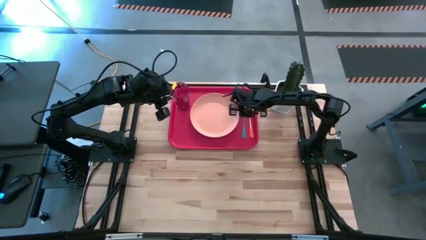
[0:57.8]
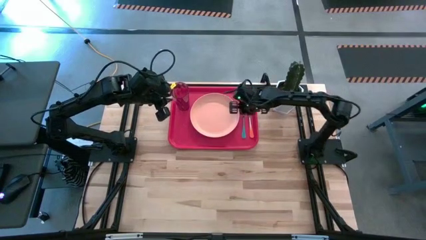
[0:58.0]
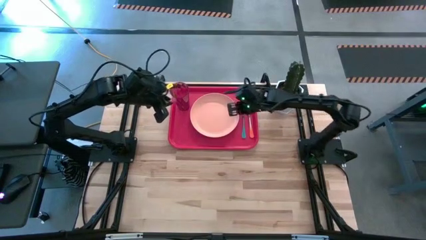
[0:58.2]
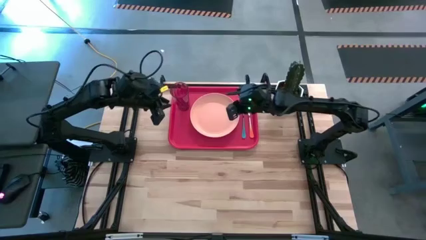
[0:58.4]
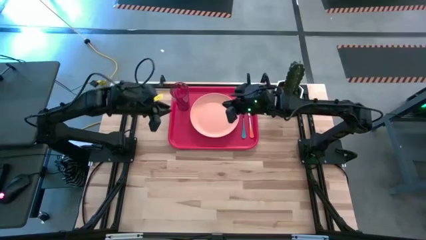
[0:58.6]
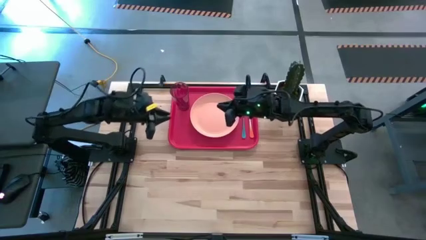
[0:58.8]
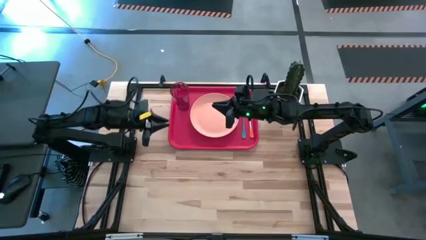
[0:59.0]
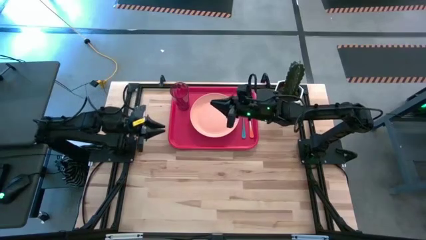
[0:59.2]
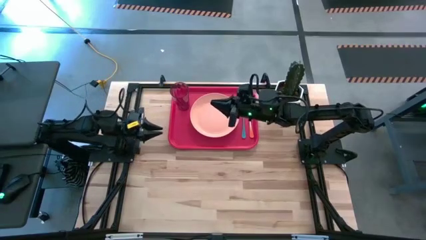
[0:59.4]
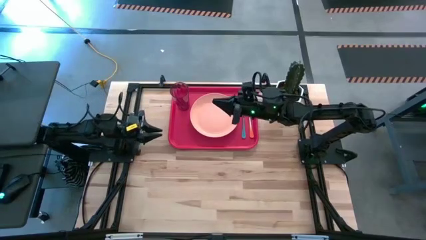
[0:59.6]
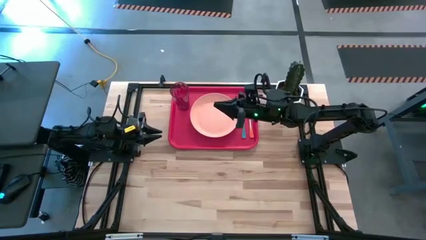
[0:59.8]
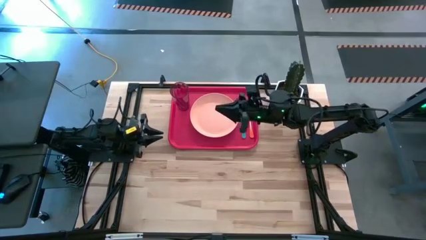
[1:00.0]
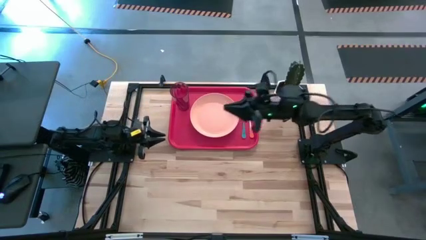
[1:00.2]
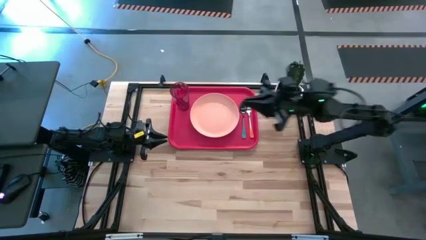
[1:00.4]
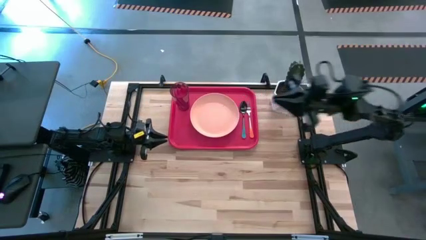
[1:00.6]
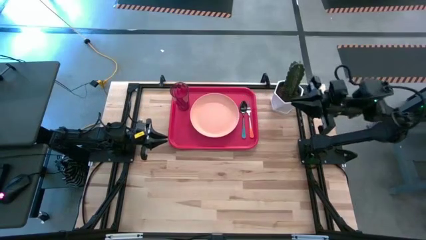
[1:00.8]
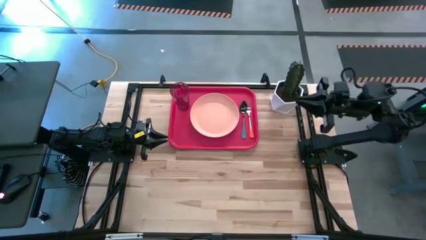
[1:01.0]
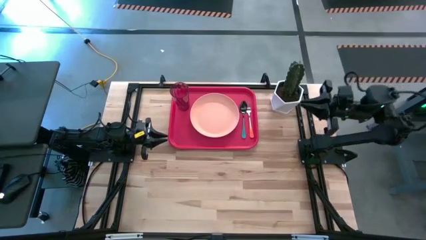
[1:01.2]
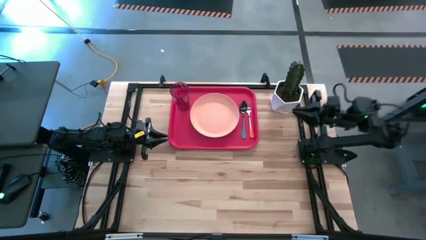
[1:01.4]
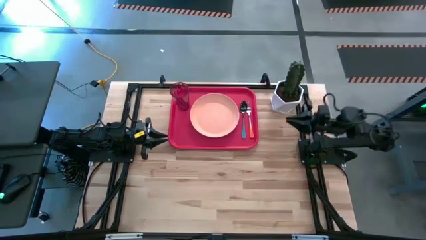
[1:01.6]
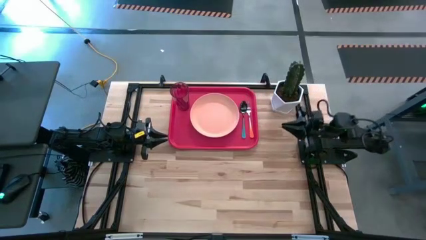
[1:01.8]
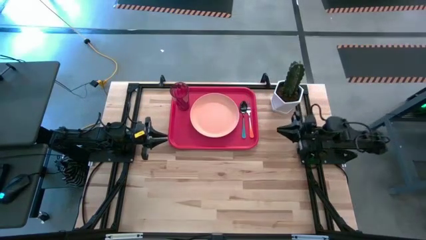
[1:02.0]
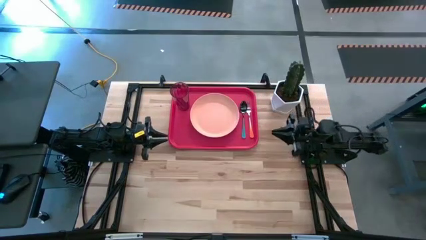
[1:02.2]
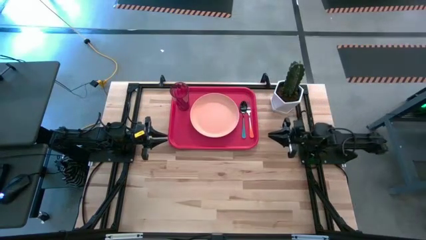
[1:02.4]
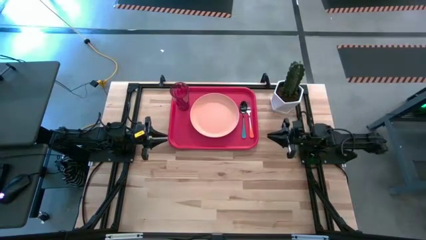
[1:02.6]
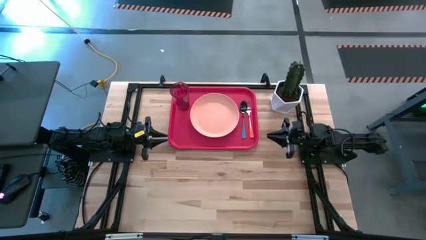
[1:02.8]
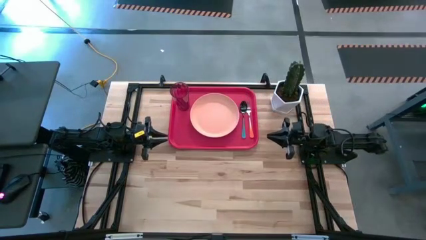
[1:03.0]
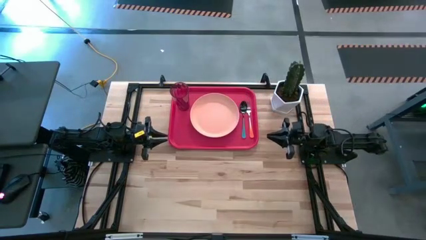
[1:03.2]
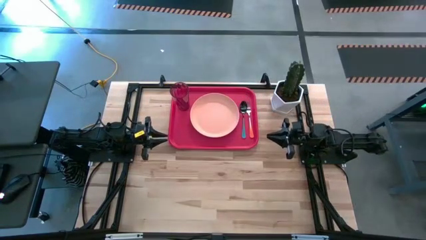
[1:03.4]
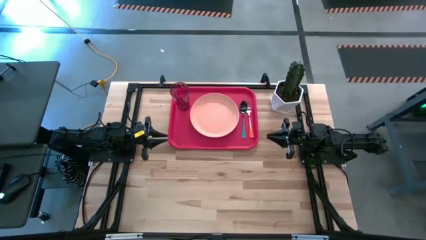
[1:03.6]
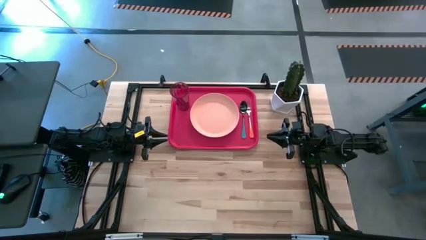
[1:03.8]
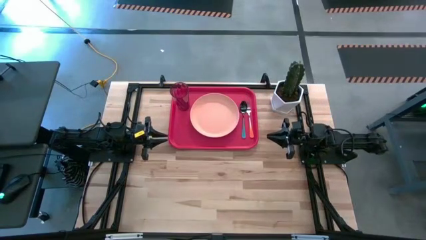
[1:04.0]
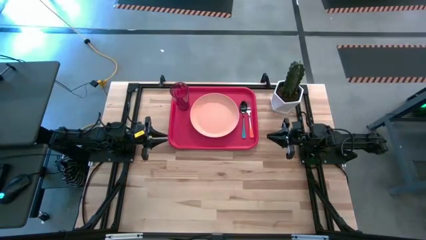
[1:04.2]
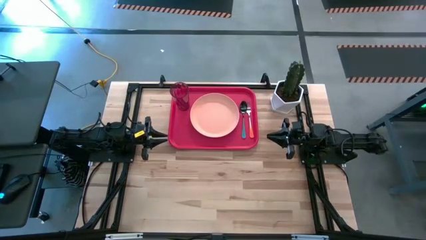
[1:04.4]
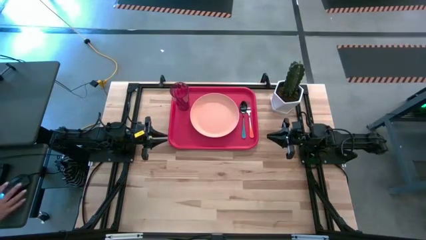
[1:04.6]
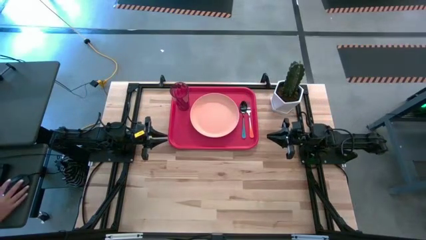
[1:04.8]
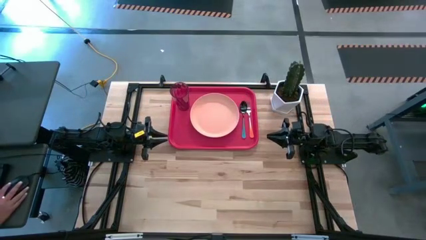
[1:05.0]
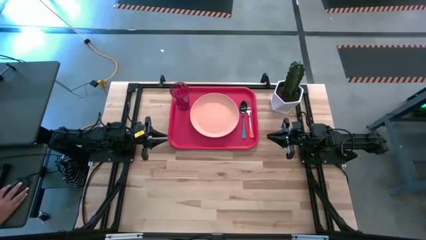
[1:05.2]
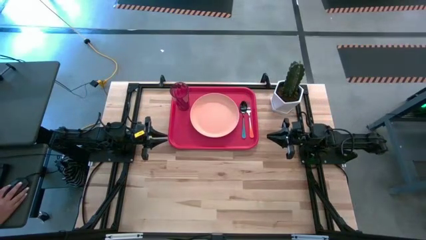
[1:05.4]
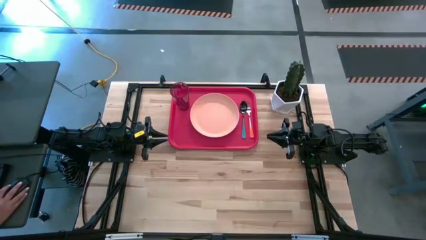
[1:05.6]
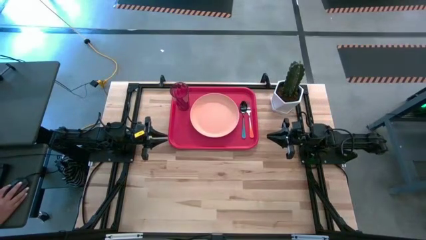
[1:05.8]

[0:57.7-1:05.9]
Task: Pick and place plate/cup/fork/spoon on tray
Return to Home Position

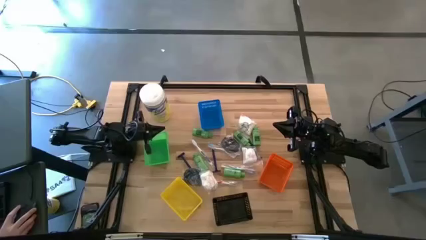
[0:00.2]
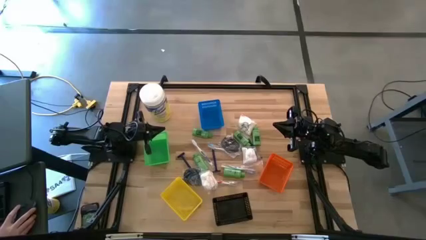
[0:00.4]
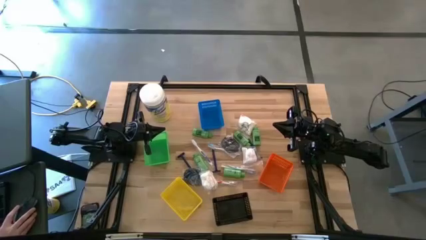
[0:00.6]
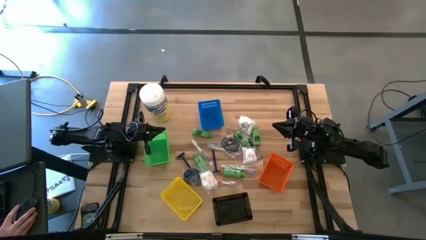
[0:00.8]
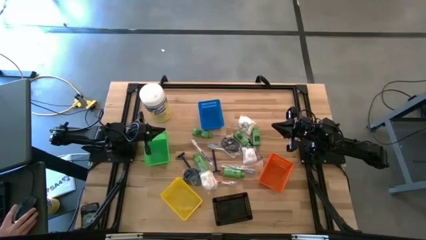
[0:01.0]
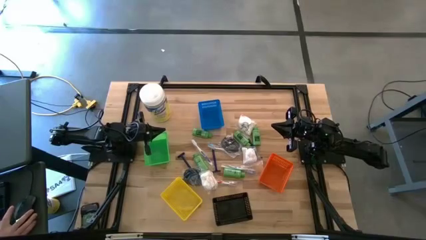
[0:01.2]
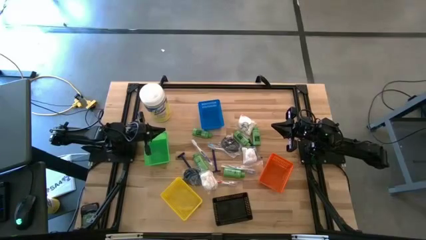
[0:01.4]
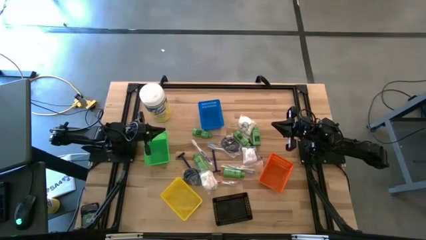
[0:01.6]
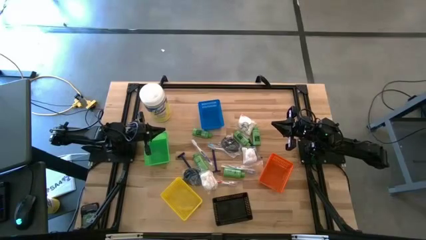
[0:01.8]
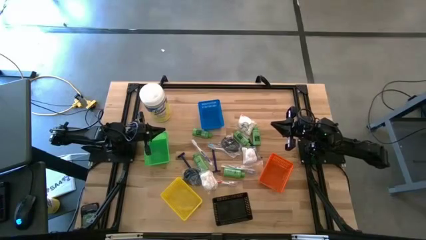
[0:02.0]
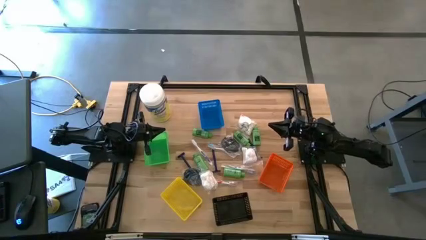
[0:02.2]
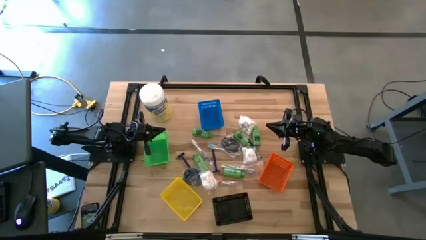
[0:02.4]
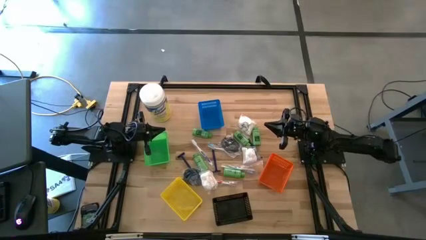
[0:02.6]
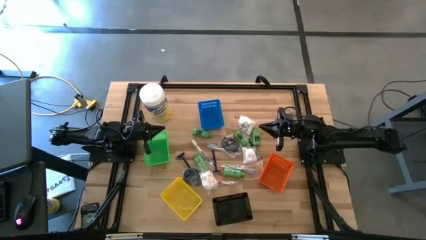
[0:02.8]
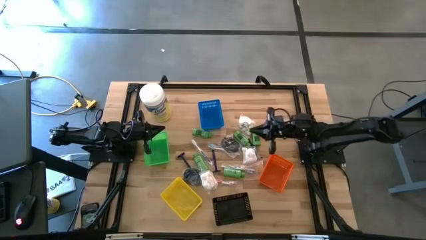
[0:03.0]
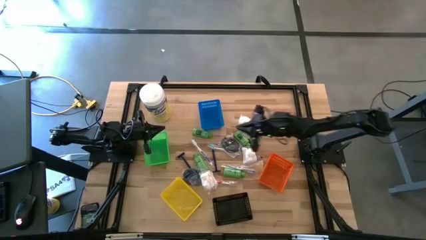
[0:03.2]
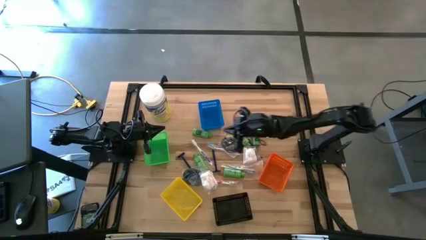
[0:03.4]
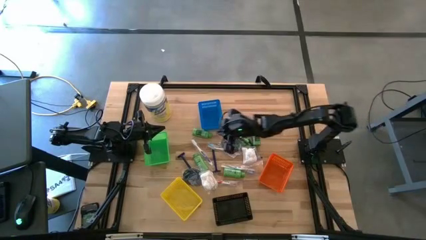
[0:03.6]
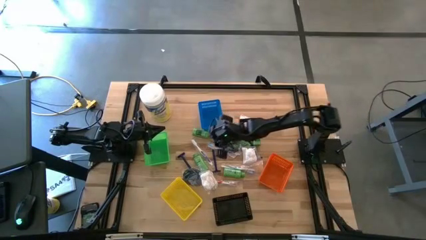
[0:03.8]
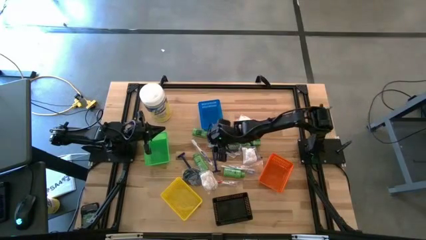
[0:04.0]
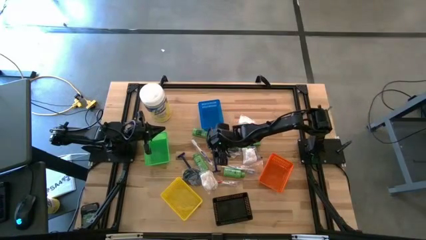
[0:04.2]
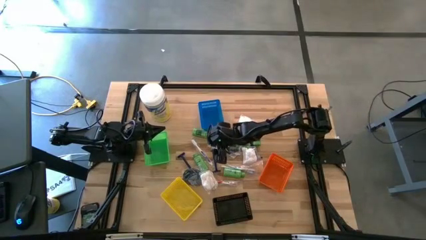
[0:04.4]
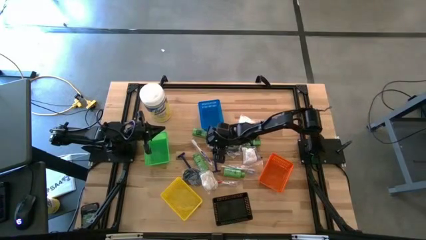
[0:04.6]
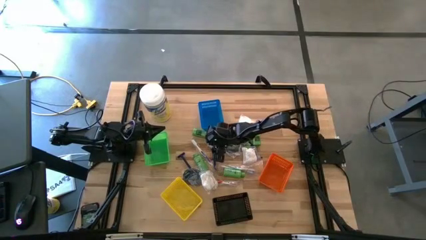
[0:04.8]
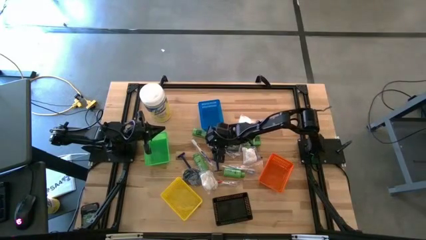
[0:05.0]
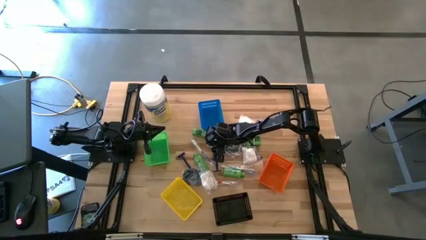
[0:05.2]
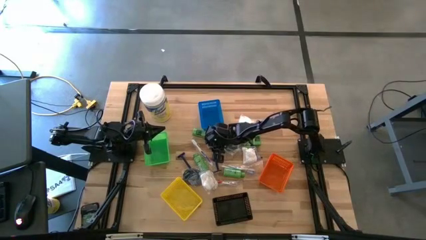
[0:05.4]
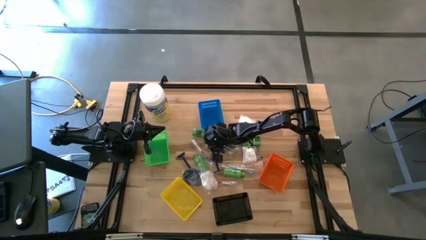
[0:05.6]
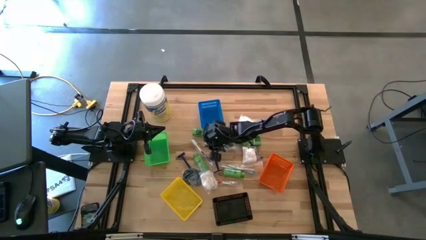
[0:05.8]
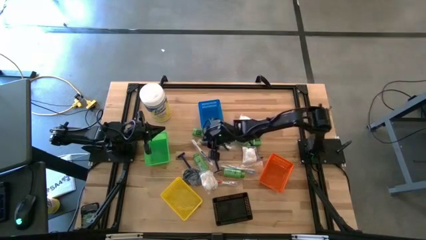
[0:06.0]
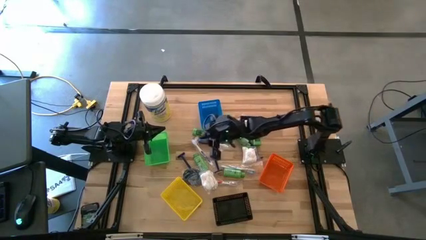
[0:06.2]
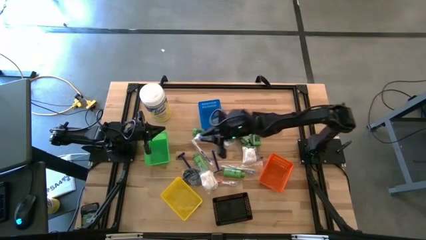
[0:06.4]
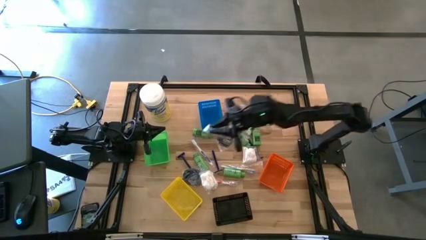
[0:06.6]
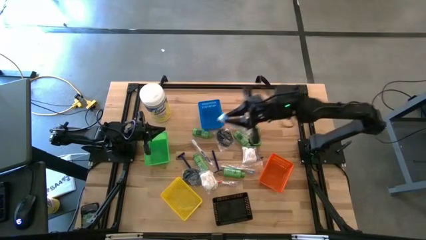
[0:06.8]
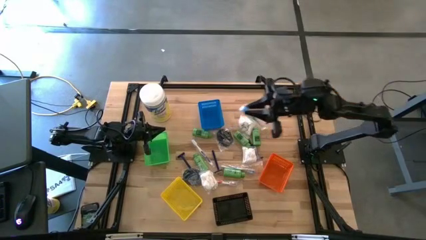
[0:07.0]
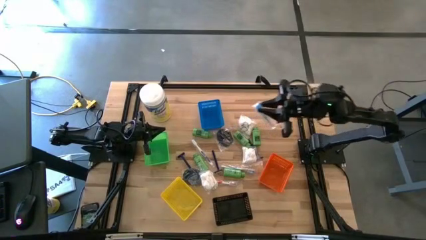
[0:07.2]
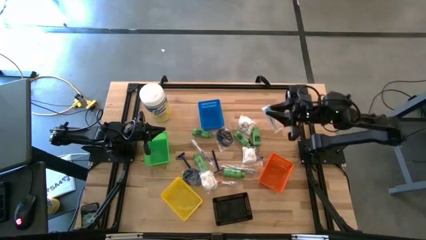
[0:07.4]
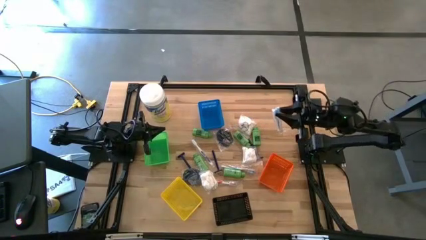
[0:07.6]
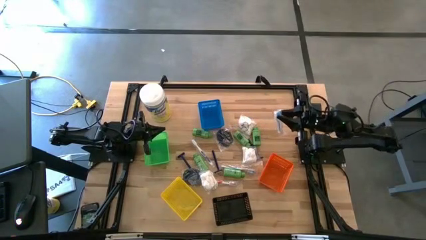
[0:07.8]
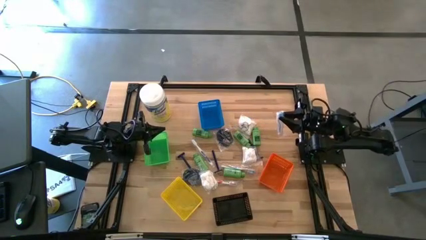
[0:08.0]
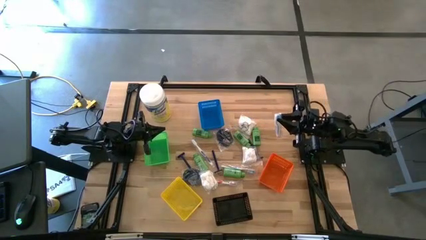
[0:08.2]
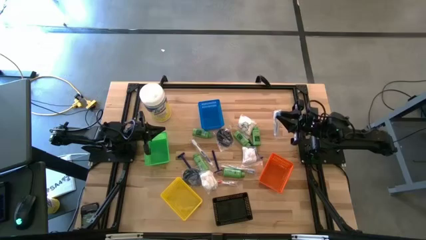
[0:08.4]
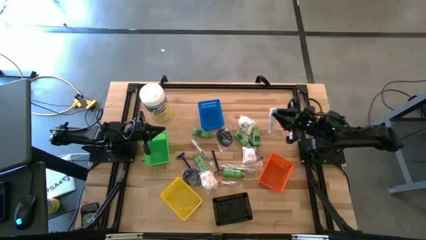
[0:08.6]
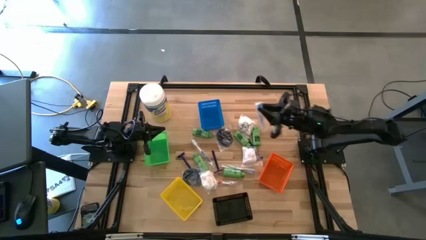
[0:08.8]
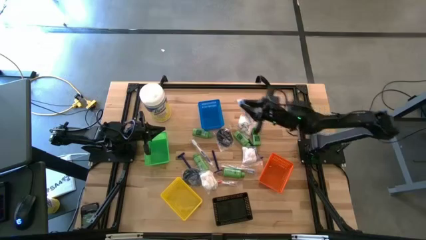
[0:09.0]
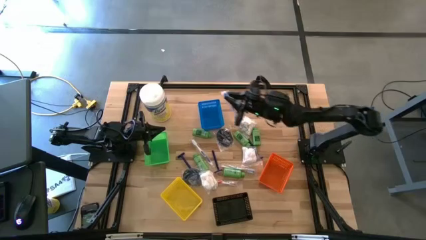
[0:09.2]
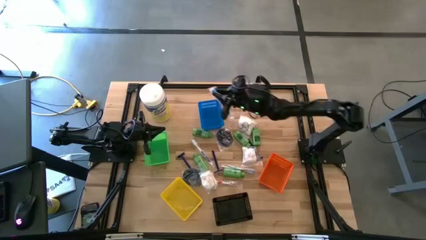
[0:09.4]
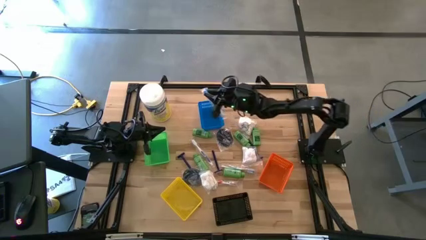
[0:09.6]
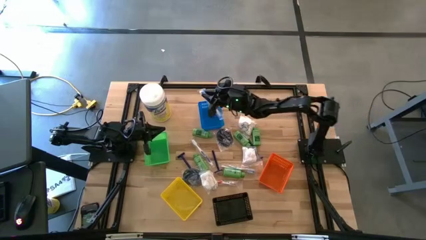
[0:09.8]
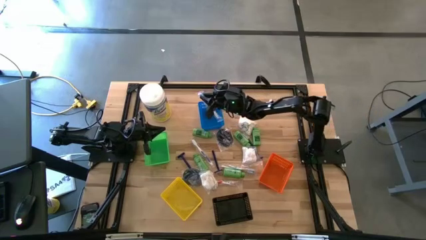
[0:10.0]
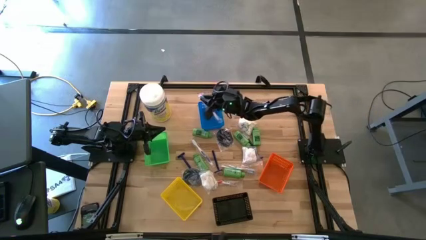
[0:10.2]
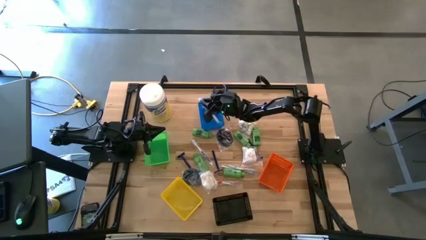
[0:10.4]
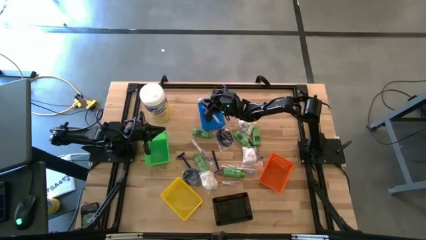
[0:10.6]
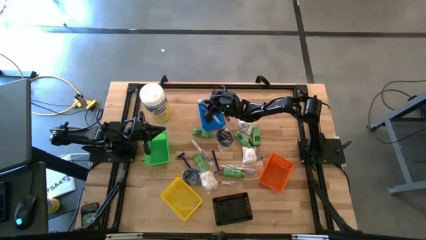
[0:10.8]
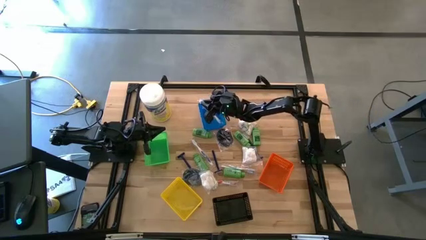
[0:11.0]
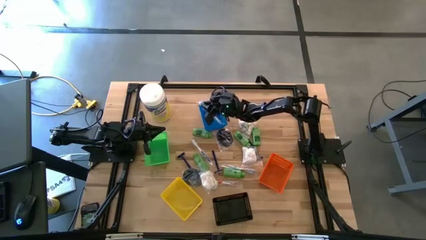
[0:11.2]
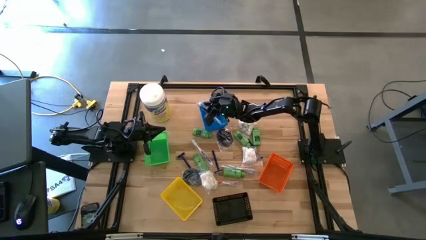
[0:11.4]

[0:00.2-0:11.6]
Task: Pick & Place Travel size toiletries
Put the blue toothbrush into the blue bin
